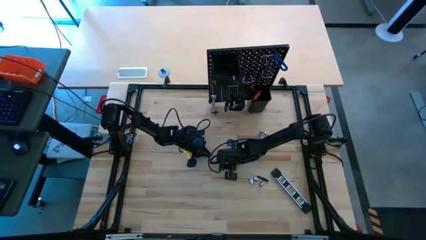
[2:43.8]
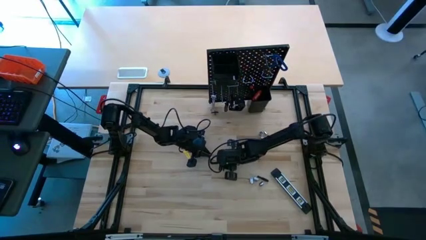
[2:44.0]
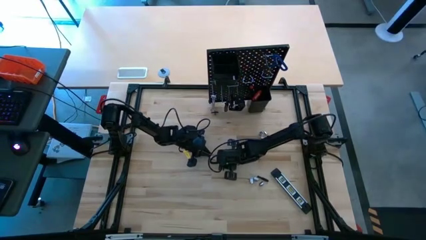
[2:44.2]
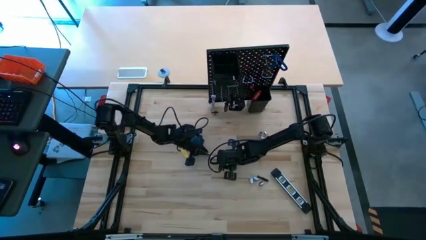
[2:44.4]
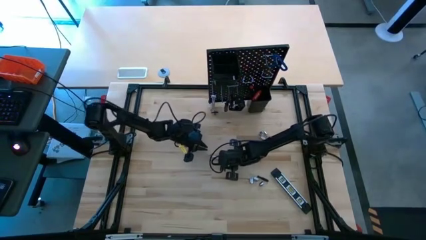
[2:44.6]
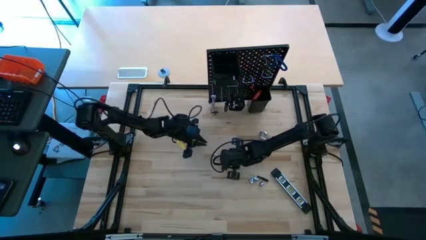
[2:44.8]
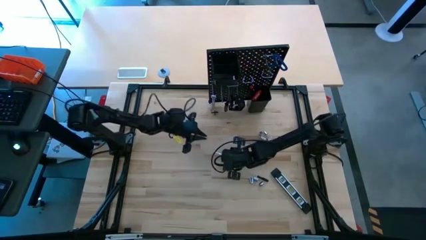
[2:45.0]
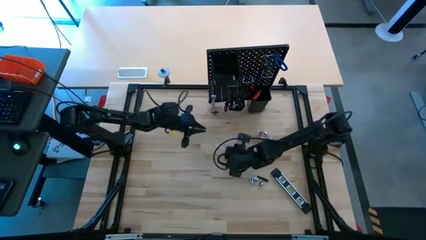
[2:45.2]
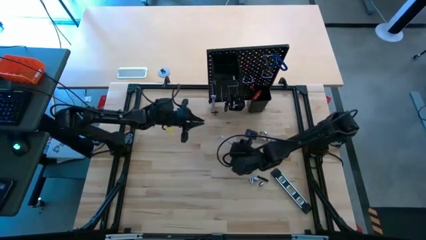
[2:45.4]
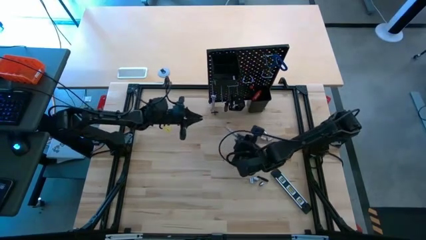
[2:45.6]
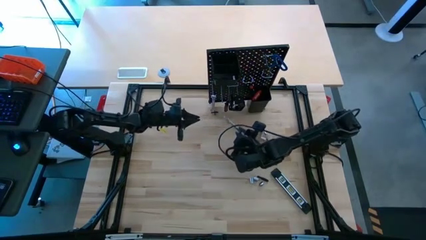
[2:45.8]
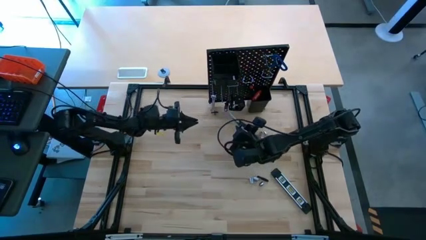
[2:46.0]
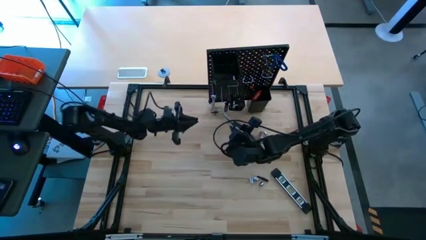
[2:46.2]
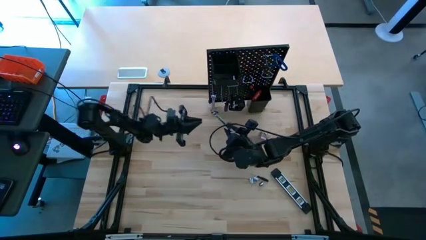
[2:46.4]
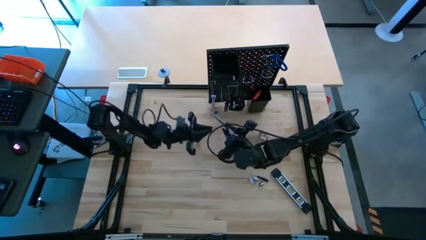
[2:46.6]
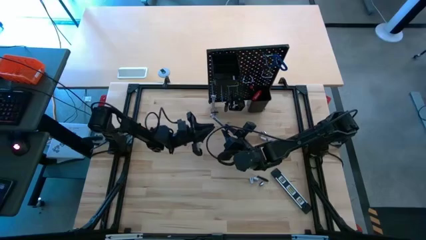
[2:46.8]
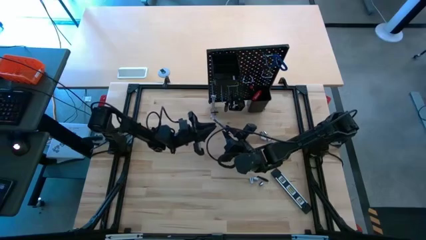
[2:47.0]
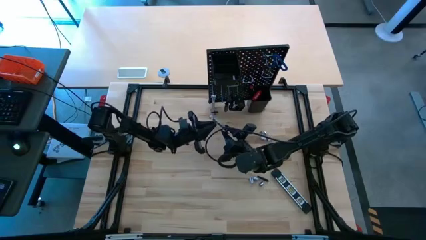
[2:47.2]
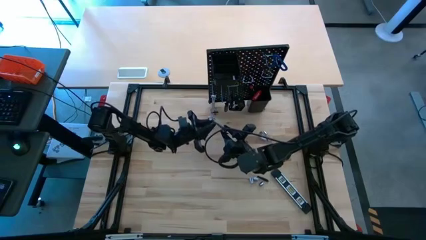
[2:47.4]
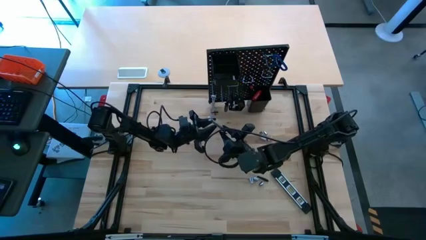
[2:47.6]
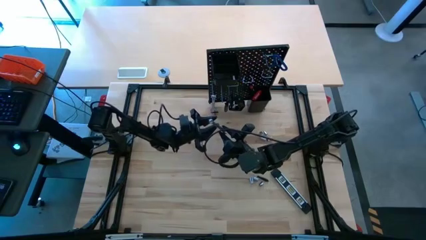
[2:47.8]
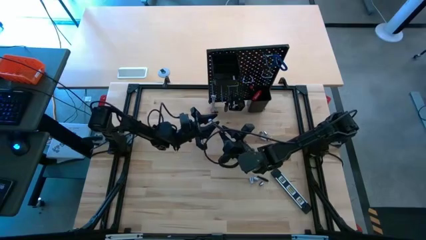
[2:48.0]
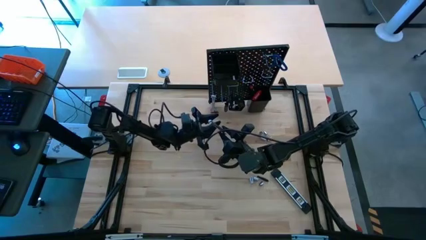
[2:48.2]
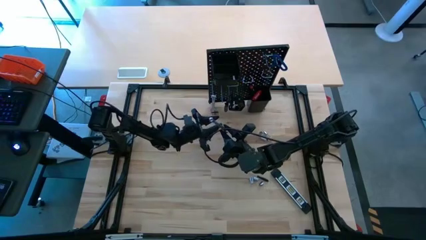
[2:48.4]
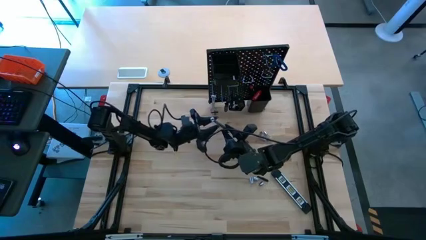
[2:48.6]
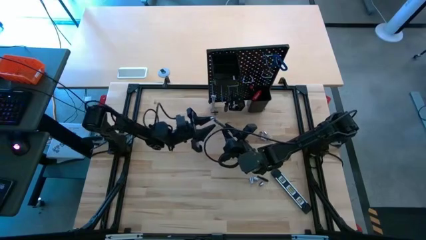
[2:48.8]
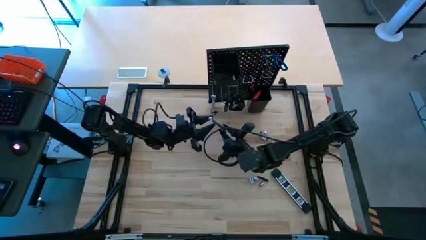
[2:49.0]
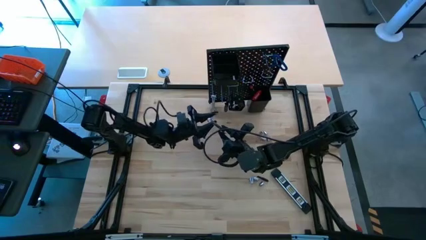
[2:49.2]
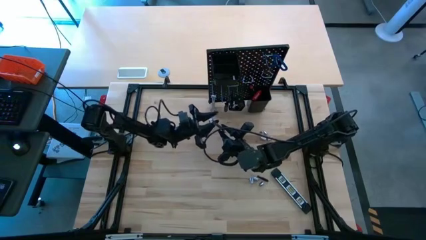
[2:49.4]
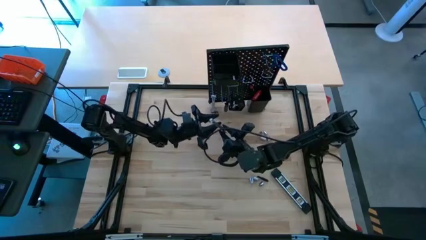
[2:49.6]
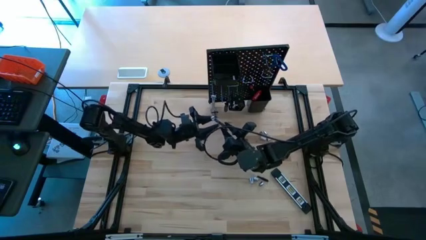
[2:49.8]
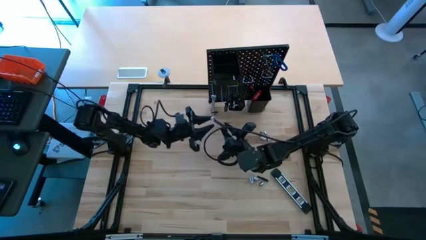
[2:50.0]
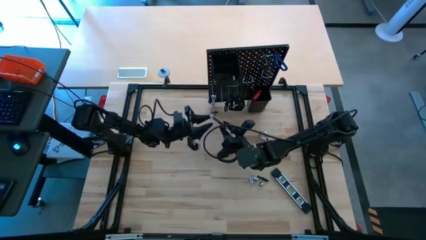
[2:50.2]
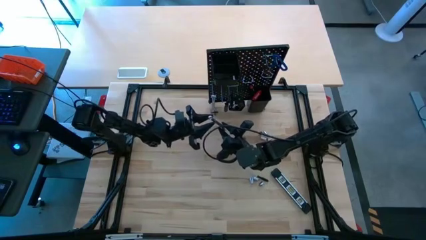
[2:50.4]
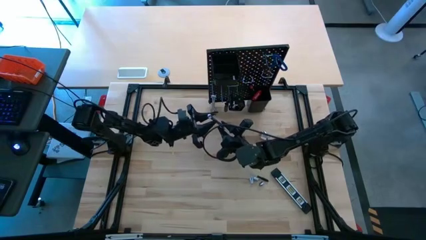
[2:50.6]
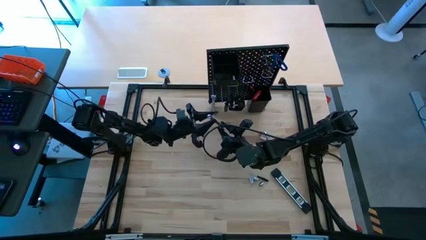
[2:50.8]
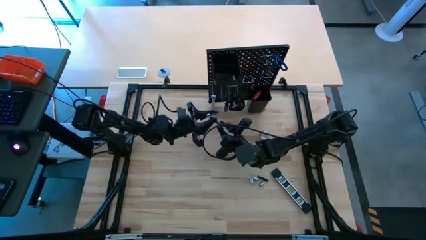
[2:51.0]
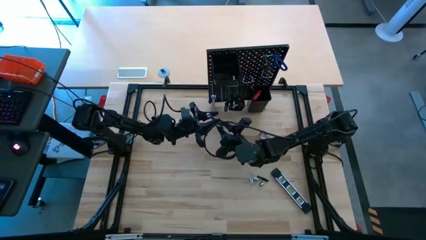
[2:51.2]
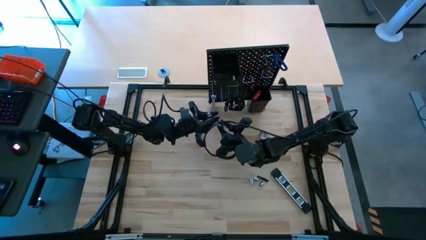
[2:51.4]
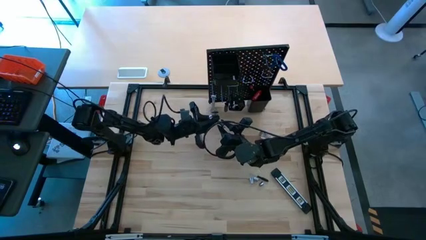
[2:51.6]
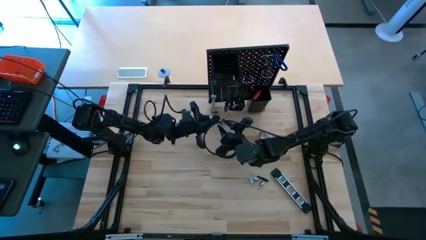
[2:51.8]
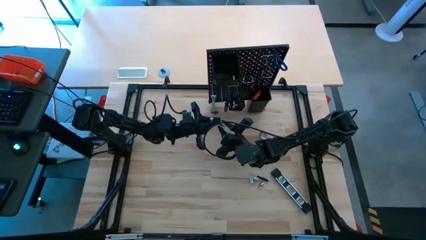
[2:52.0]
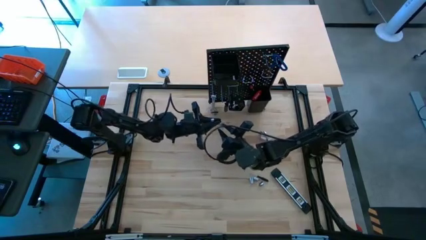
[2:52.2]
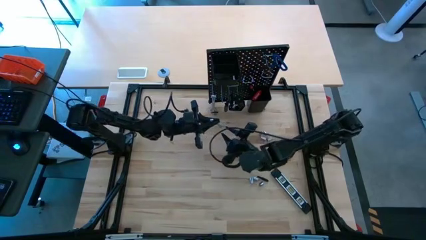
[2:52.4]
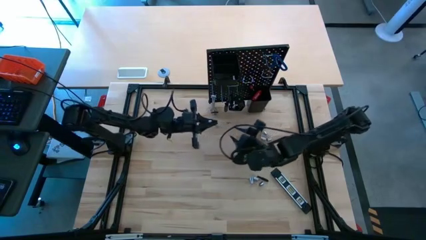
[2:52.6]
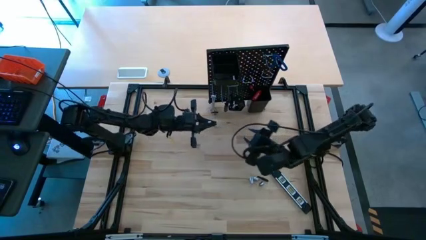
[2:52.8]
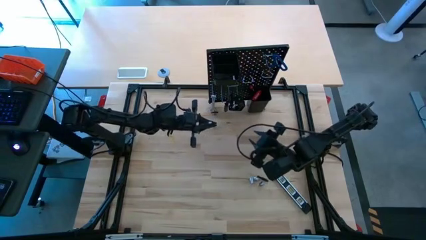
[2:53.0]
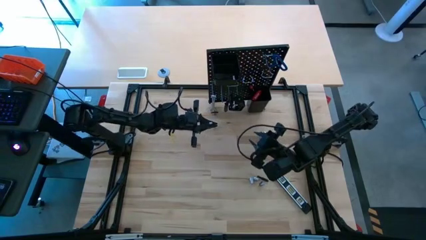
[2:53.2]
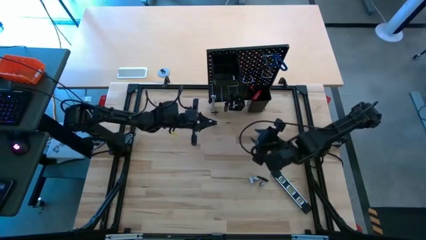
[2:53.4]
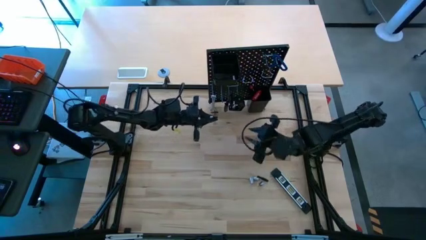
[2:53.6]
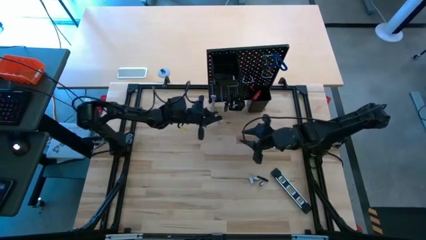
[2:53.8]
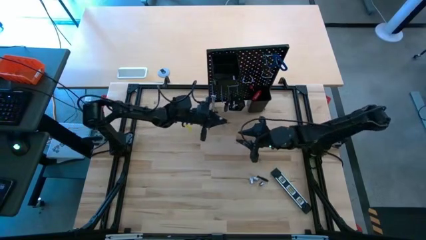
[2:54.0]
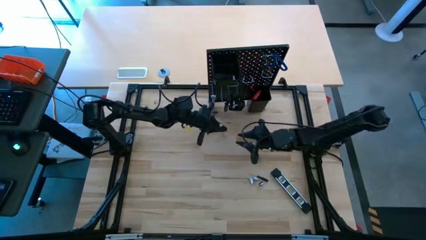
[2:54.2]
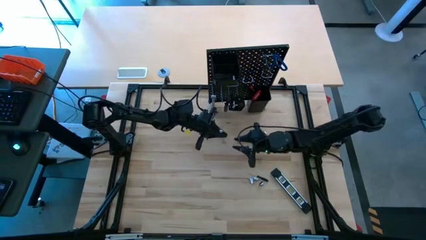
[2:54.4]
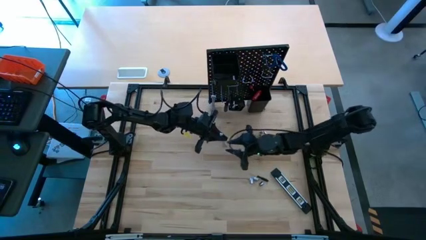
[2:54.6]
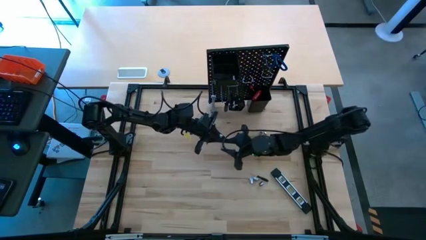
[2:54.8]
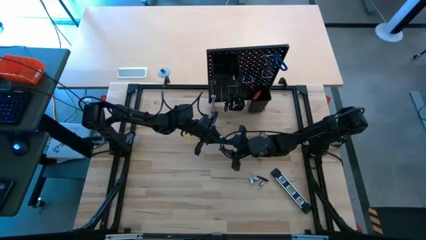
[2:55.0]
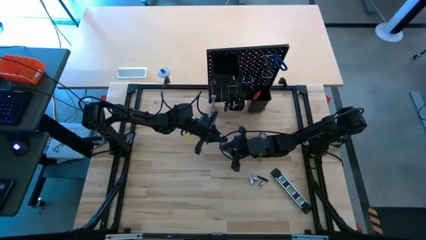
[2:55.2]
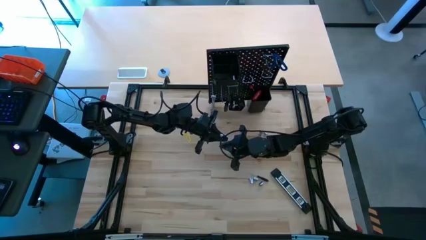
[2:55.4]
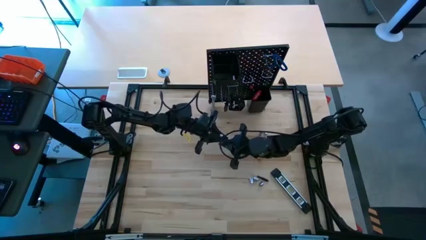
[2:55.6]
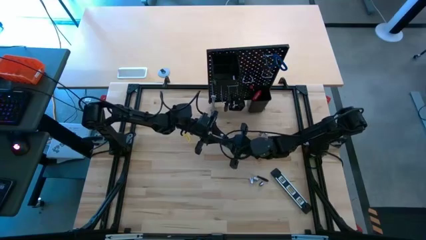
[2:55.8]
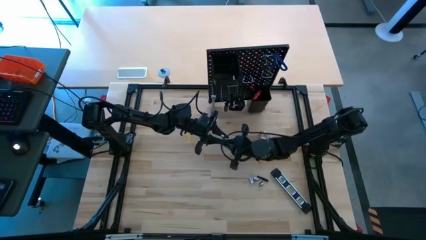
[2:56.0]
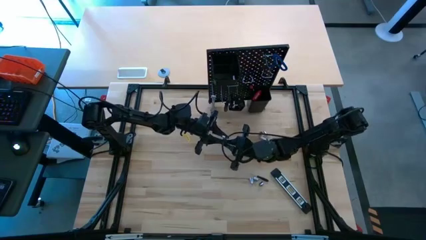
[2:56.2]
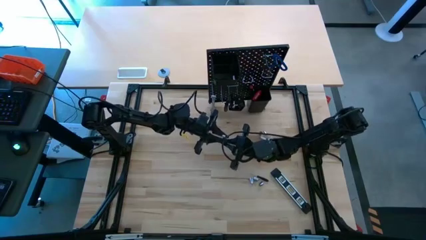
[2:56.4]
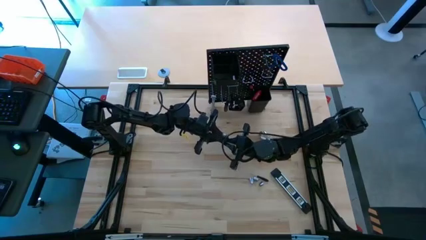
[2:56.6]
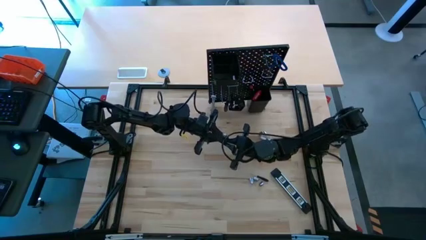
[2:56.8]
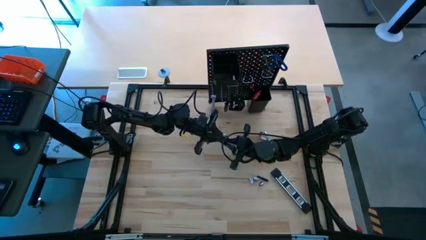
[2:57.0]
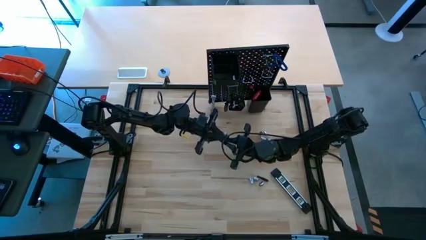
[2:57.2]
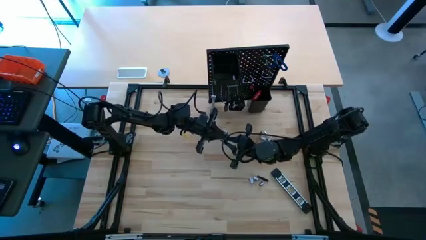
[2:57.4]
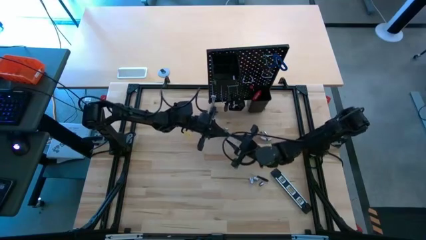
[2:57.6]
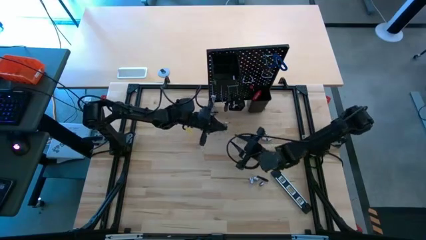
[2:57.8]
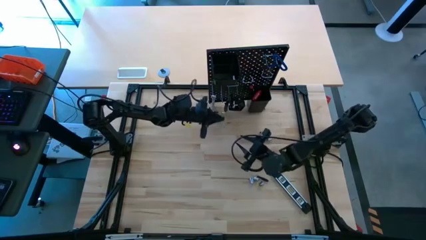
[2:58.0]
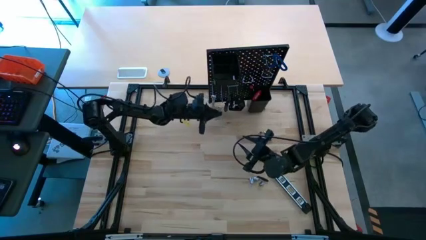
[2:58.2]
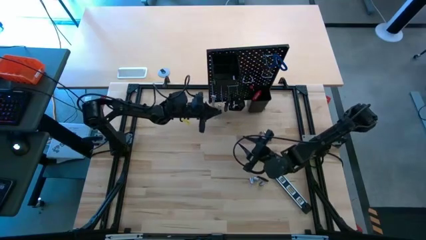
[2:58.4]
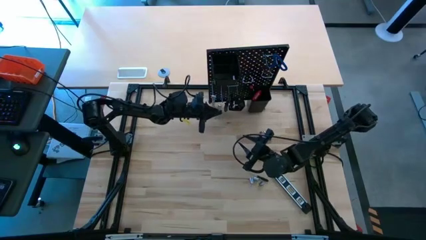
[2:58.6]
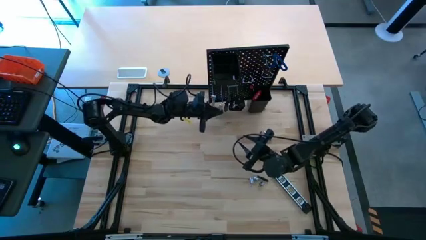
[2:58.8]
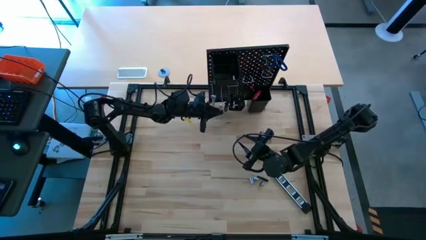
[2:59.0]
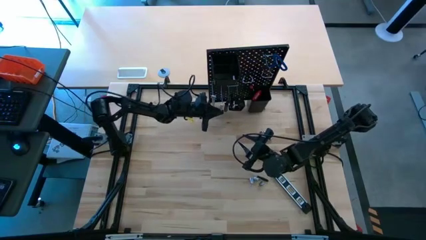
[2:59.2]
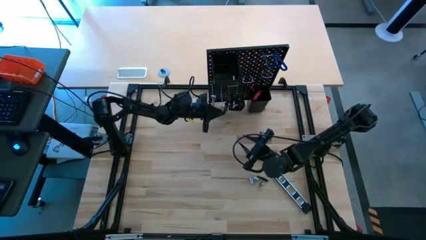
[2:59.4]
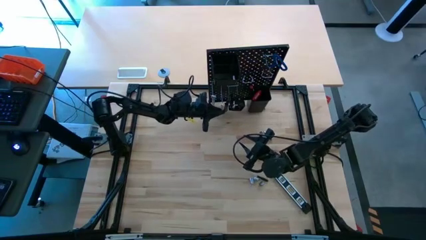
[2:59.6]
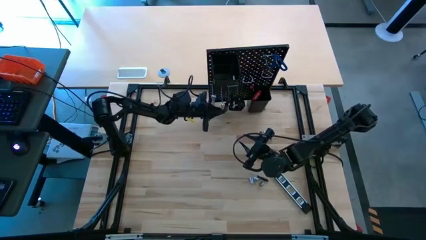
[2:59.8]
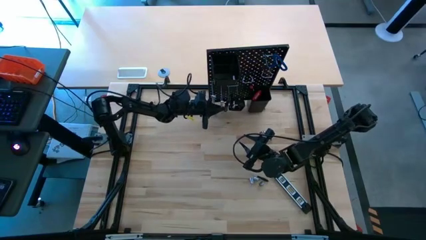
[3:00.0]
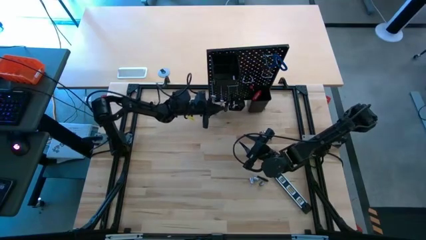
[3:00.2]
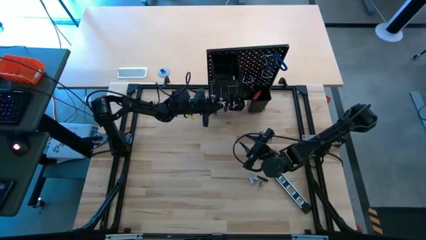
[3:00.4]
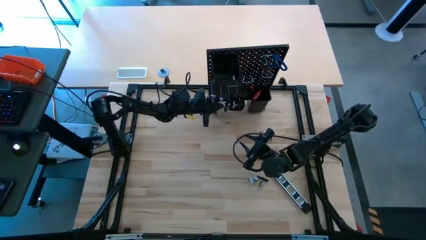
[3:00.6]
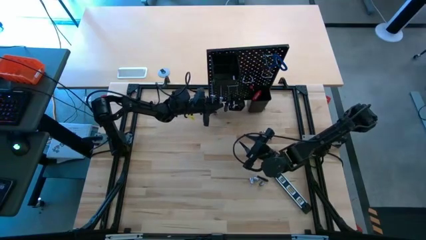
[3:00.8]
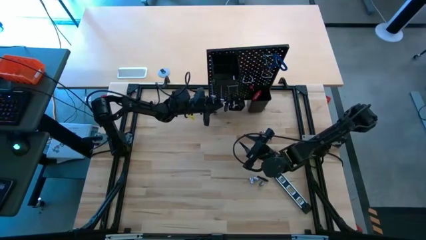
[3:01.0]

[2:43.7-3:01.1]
Task: Hang tools onto peg board
Hang the silver wrench on the peg board

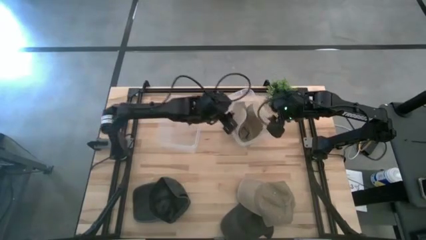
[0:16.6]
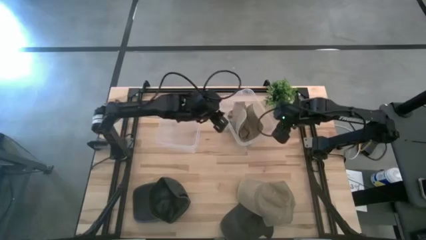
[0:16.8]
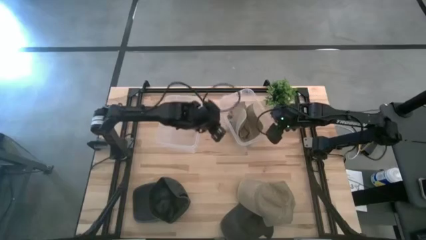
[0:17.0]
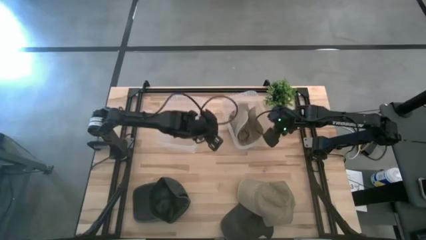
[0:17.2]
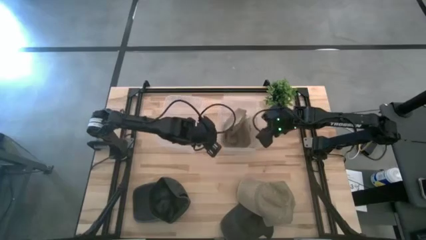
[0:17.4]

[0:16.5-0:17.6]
Task: Pick & Place hat
Adjust the right transparent bin on the table
